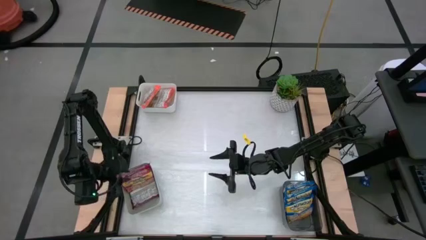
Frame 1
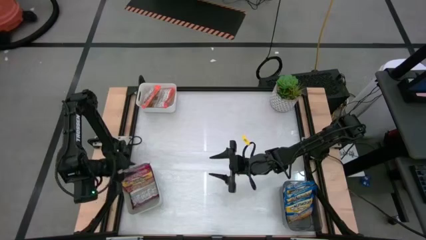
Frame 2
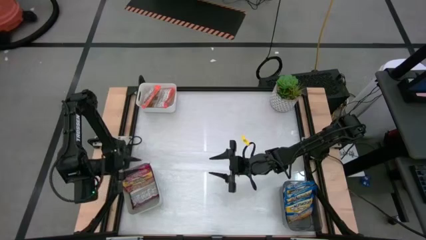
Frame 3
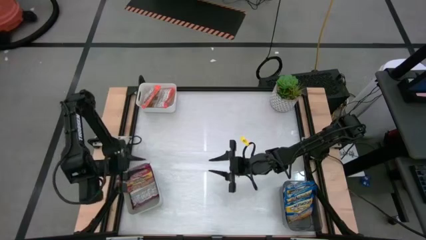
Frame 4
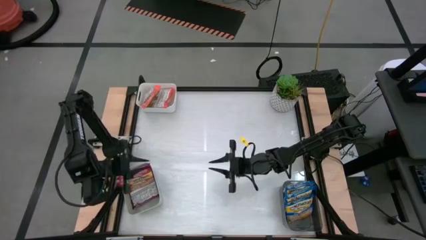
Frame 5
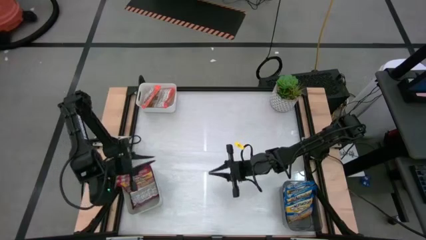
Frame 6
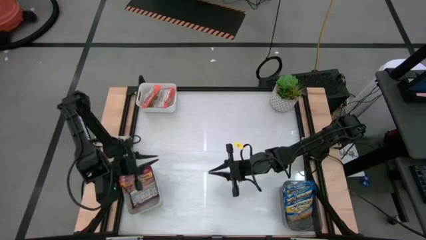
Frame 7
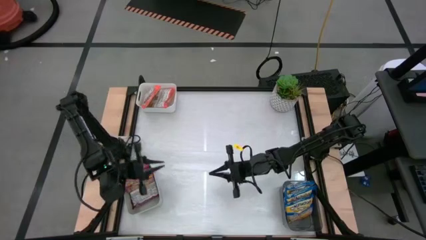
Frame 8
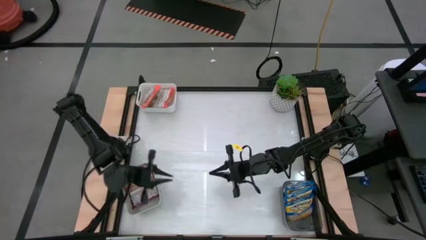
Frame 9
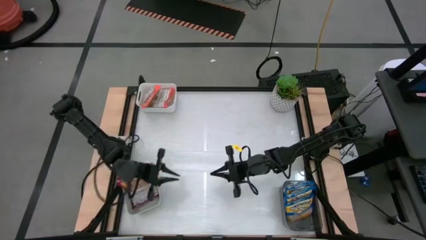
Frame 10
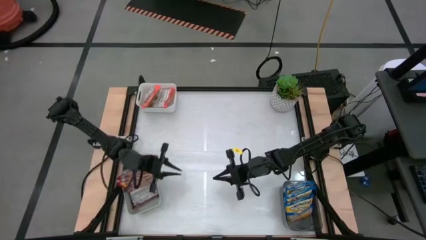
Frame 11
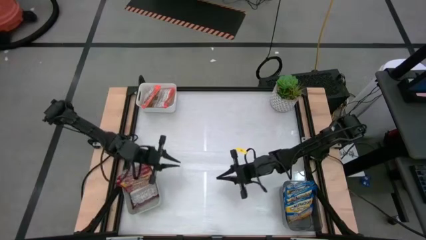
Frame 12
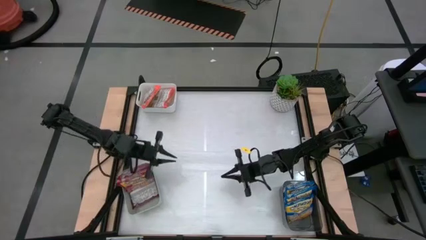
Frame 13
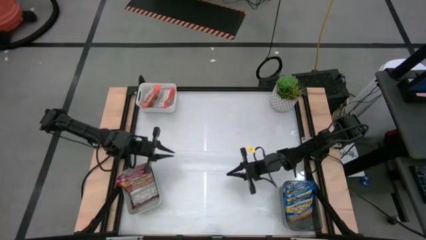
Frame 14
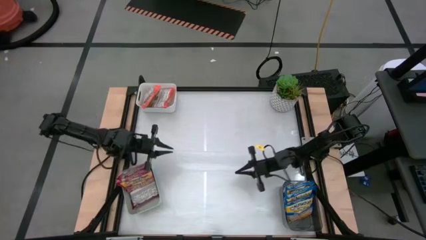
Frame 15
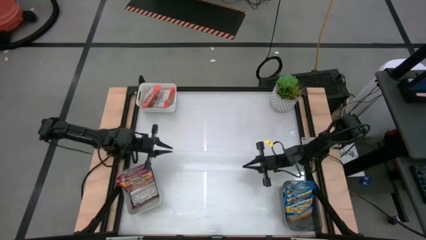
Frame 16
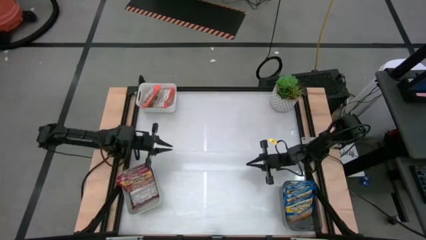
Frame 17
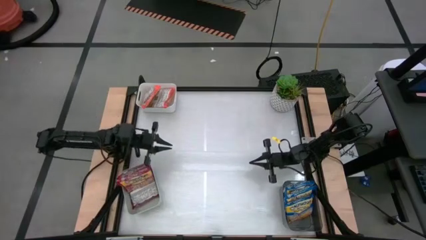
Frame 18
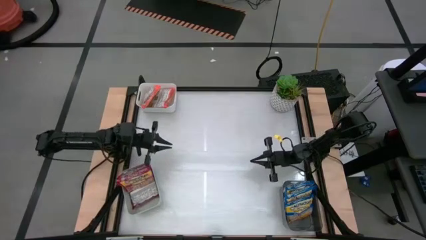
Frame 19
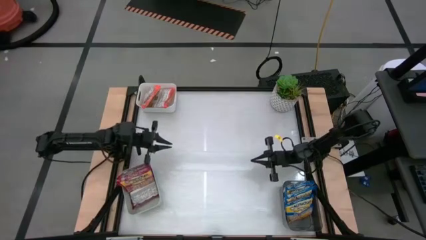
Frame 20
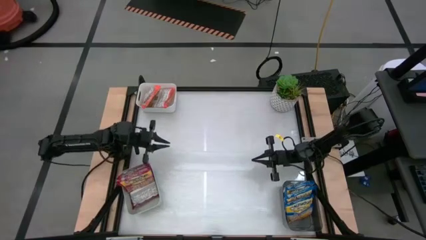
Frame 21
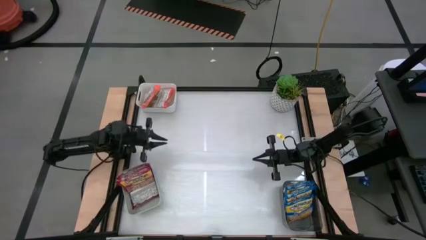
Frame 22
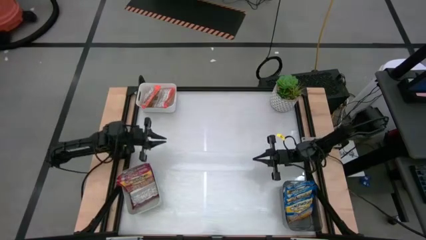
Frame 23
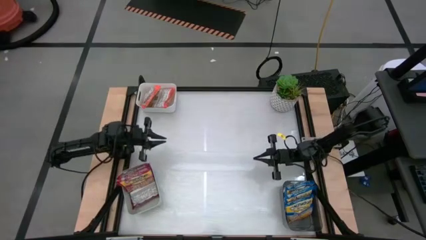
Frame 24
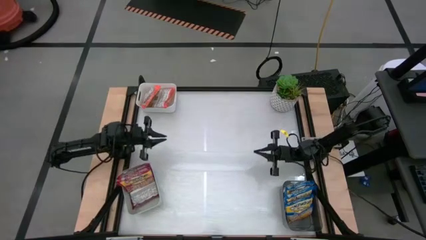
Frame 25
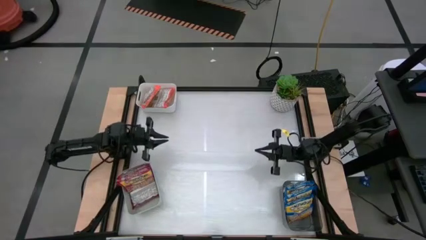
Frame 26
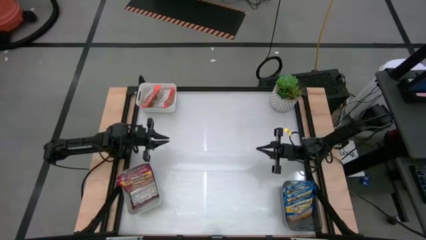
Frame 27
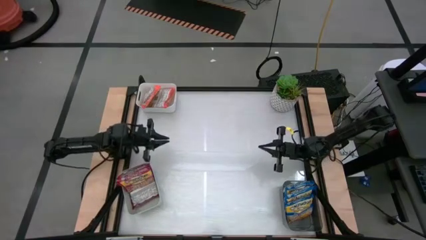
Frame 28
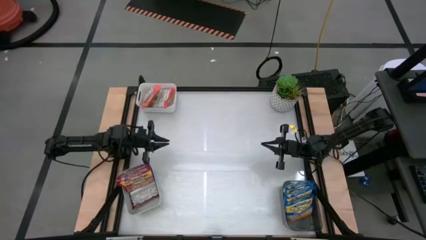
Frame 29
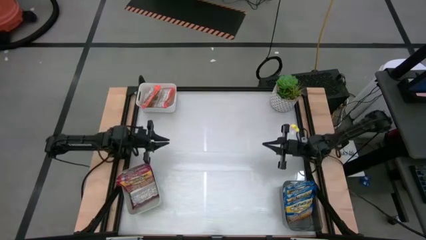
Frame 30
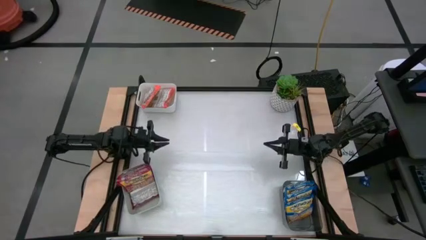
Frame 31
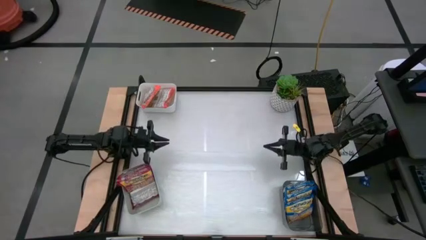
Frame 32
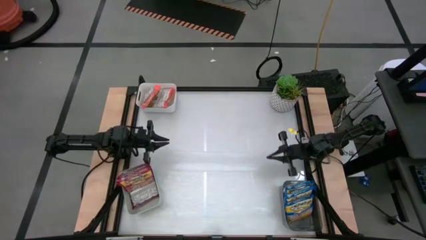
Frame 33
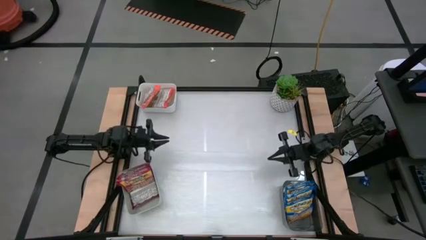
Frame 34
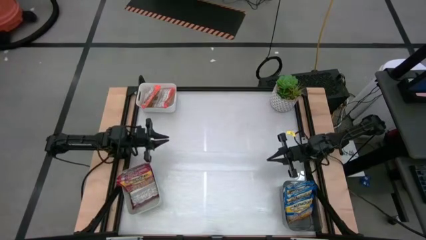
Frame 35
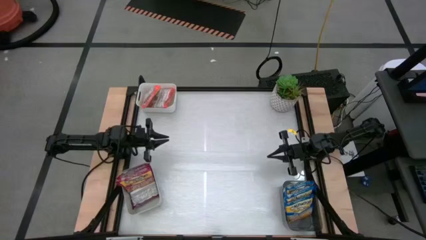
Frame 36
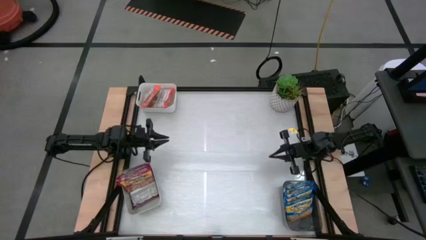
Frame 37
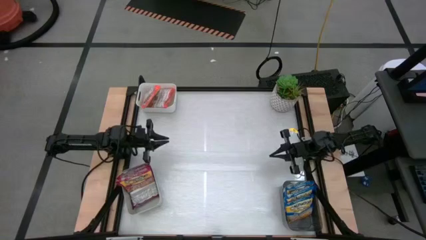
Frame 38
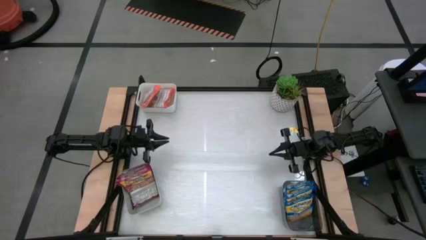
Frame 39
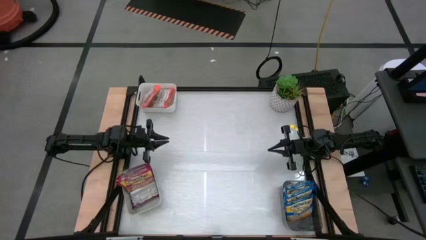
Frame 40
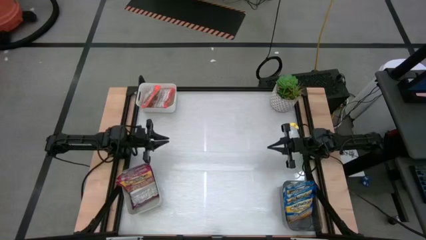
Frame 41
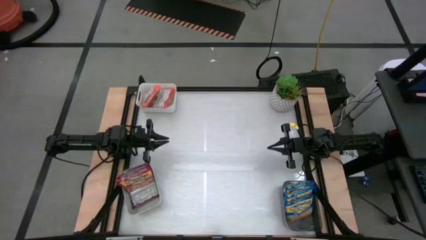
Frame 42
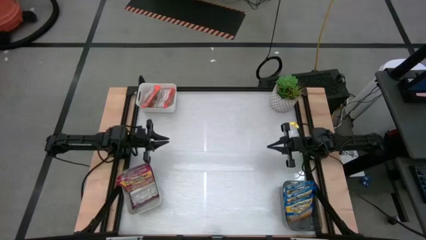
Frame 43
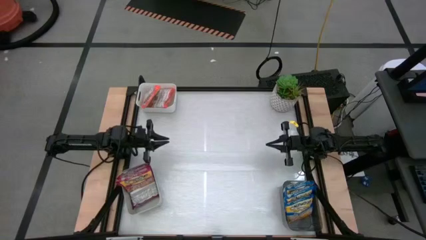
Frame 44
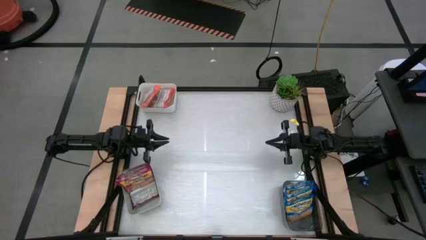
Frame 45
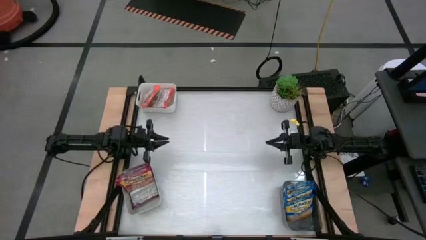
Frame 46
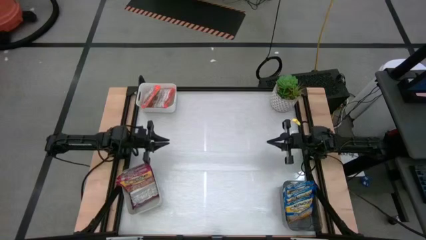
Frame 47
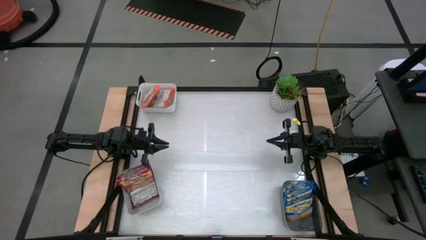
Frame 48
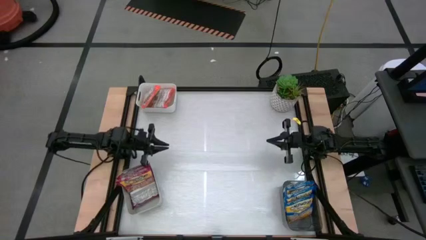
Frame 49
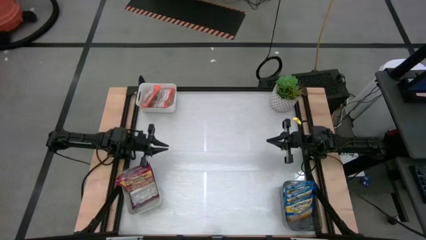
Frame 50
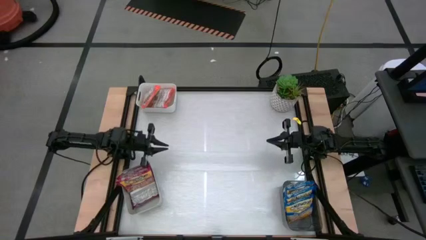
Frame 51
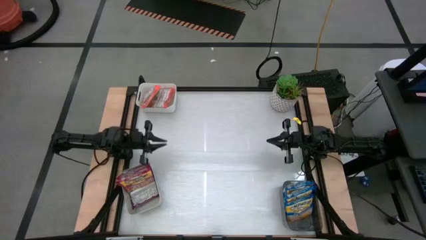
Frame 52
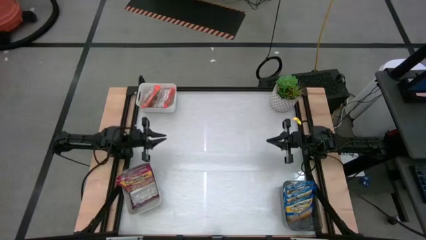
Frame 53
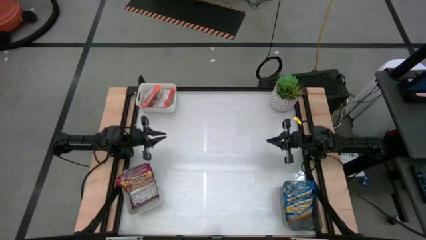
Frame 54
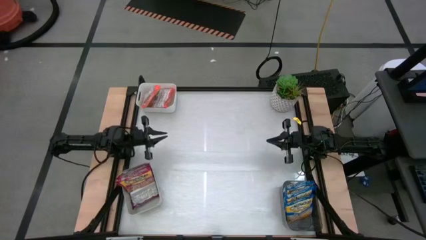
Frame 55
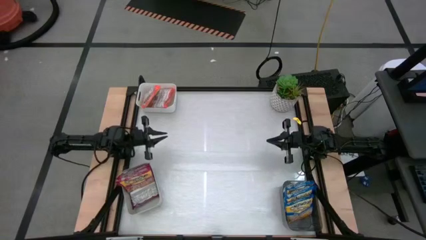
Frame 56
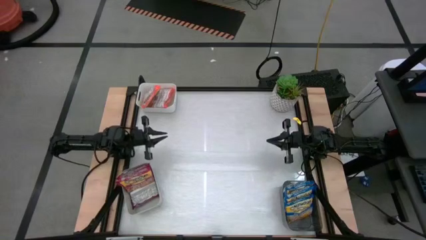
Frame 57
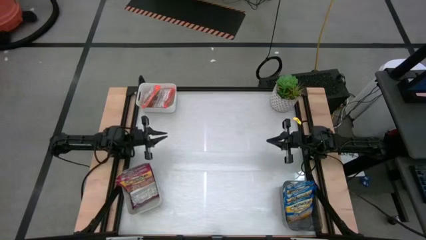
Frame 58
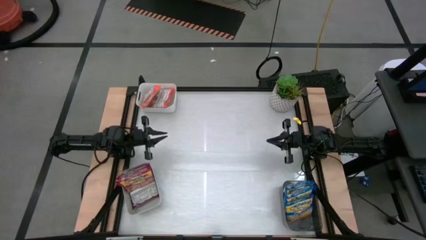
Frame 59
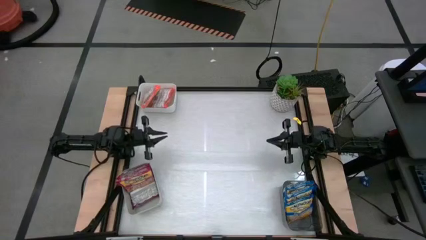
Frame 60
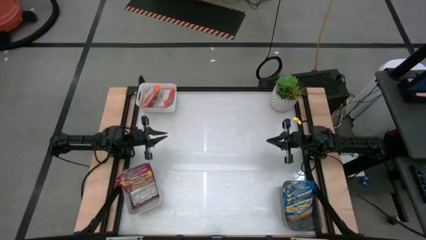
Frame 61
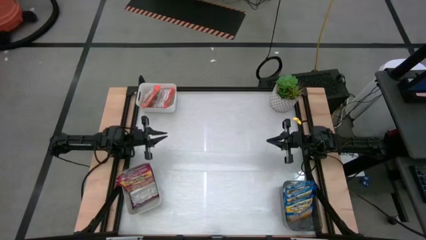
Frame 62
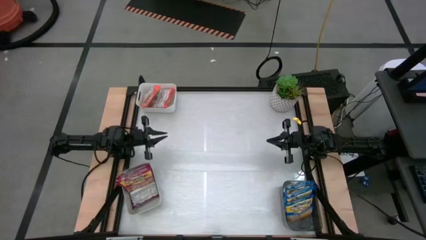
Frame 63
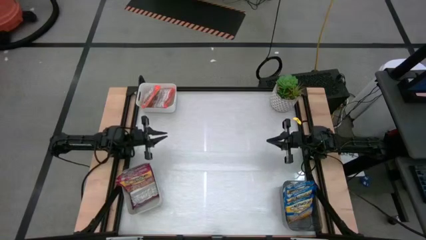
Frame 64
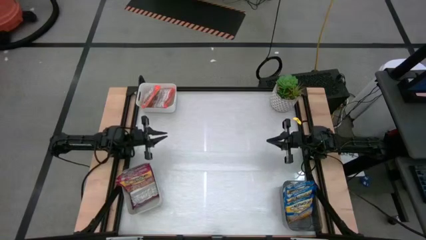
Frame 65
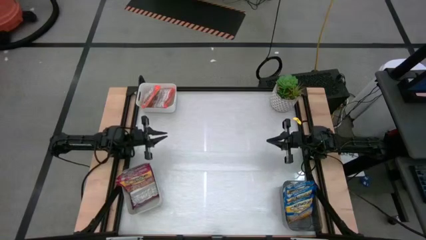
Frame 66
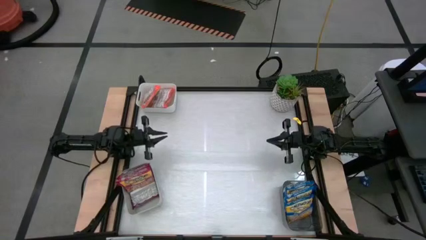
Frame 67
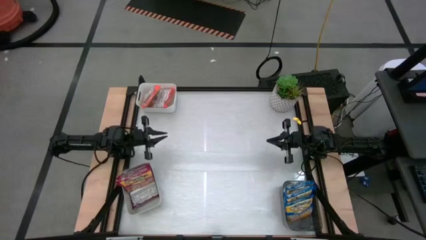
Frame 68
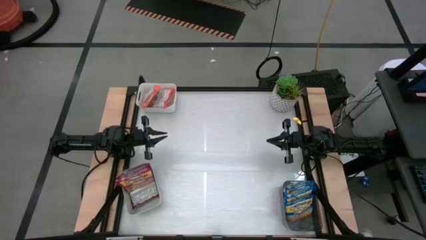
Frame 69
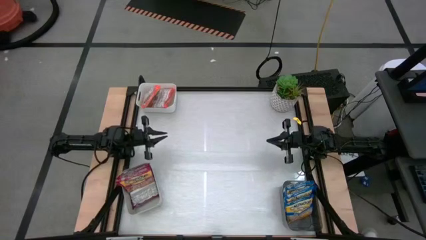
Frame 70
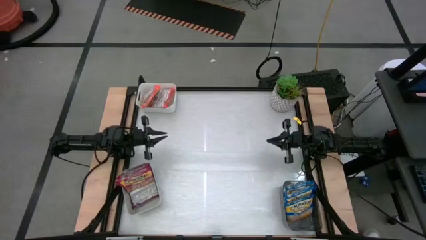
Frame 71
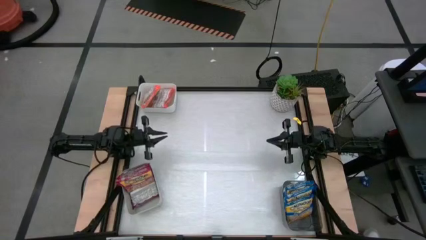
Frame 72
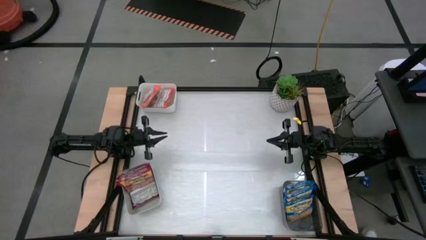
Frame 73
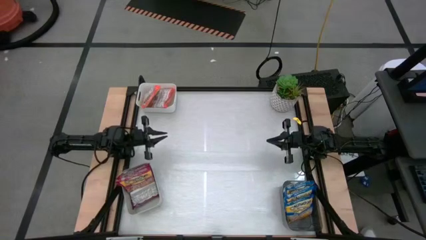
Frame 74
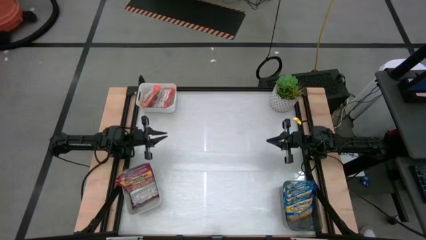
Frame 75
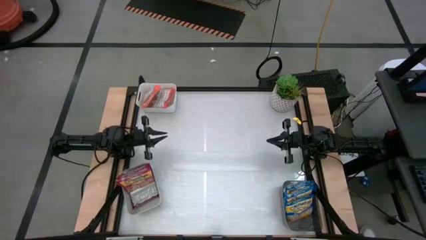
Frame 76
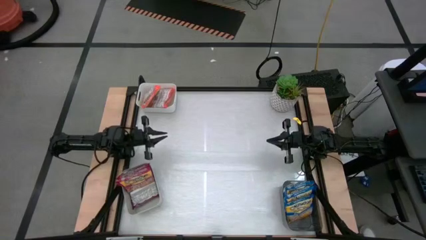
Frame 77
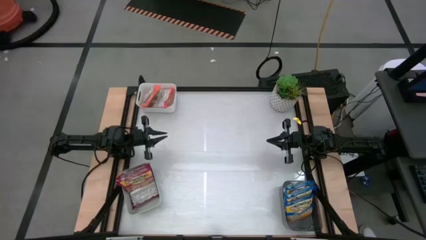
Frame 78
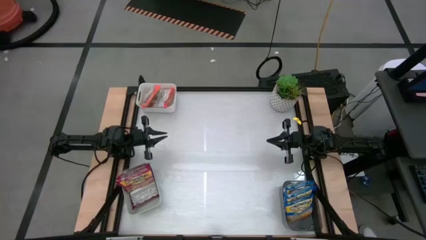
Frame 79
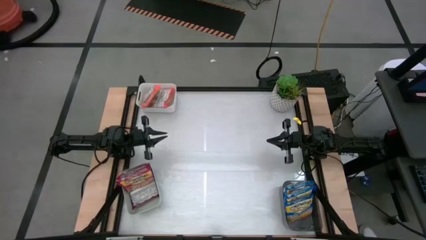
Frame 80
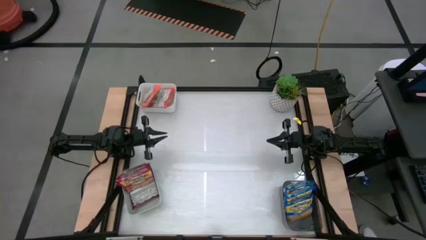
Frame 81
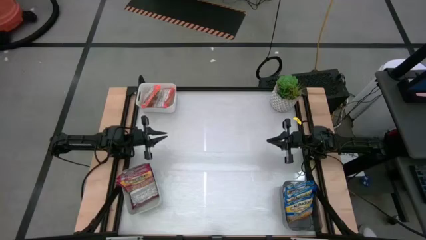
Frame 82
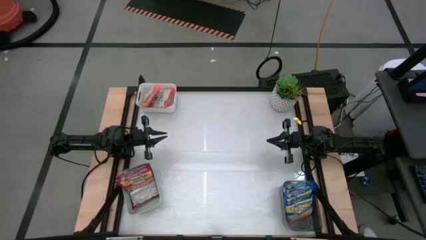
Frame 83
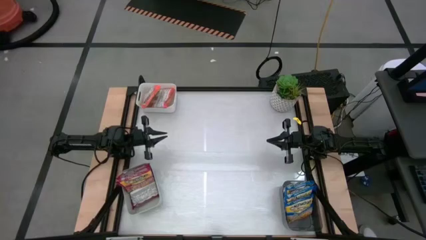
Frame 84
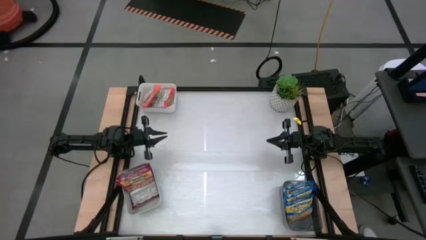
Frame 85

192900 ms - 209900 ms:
Task: Sort Maruchan noodles
Return to Home Position
